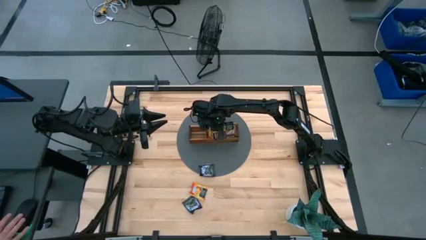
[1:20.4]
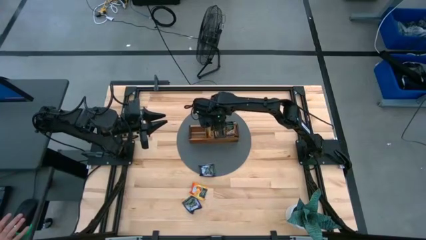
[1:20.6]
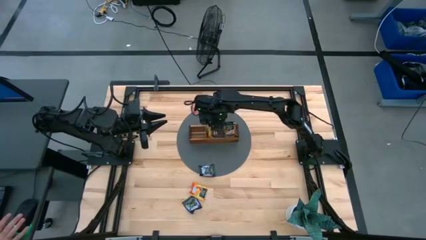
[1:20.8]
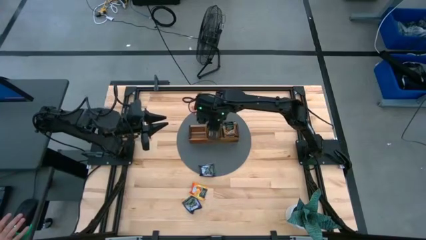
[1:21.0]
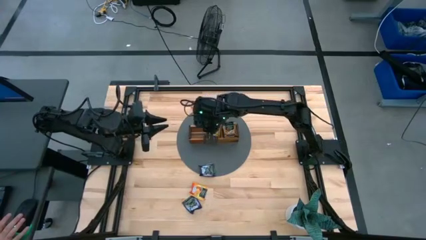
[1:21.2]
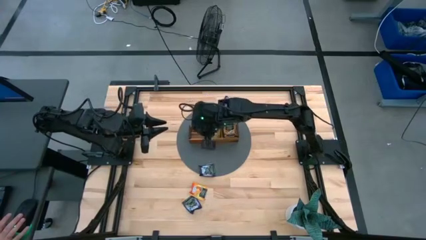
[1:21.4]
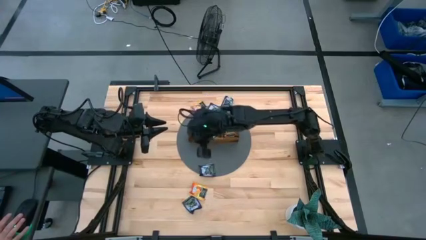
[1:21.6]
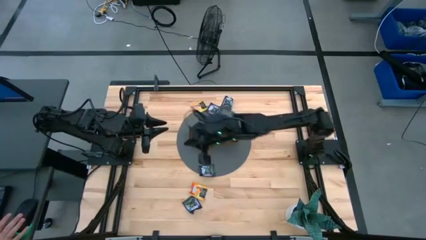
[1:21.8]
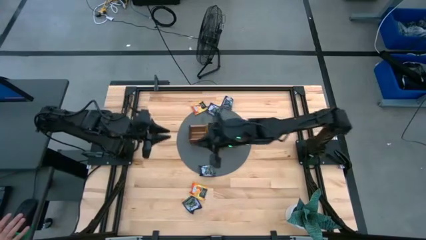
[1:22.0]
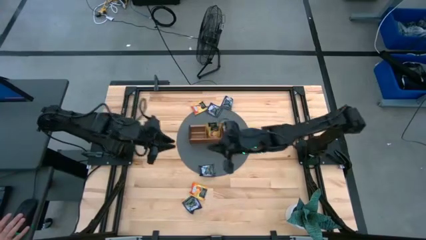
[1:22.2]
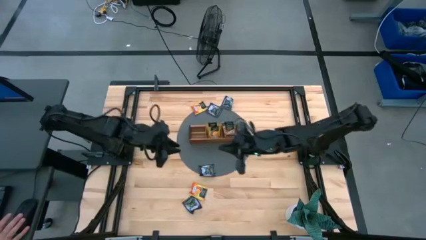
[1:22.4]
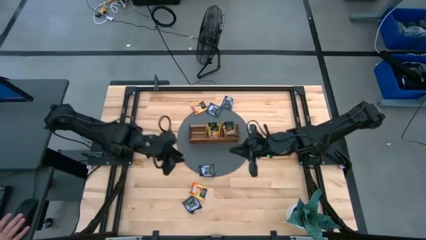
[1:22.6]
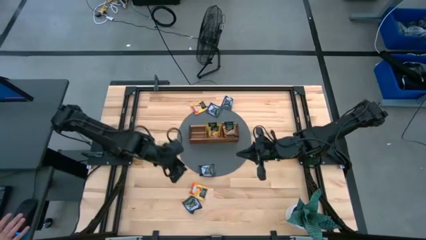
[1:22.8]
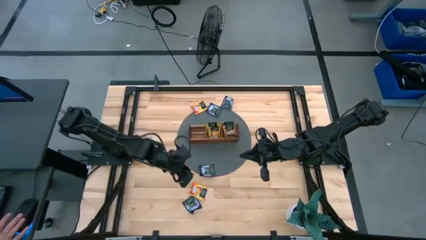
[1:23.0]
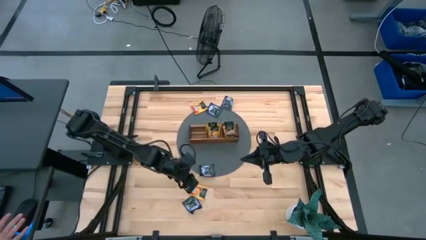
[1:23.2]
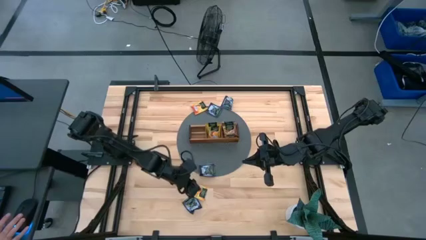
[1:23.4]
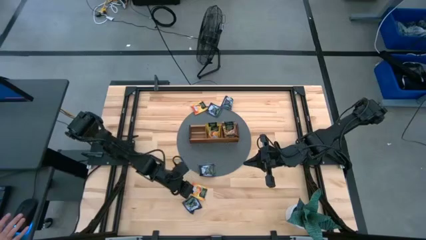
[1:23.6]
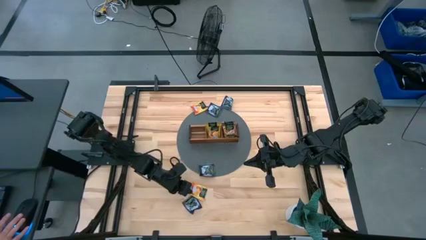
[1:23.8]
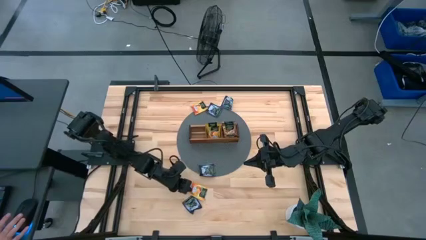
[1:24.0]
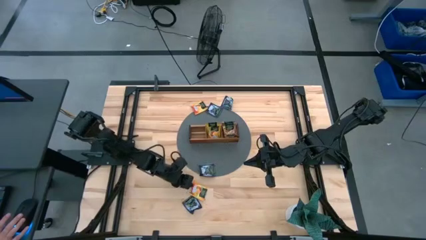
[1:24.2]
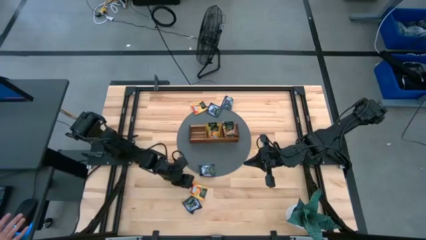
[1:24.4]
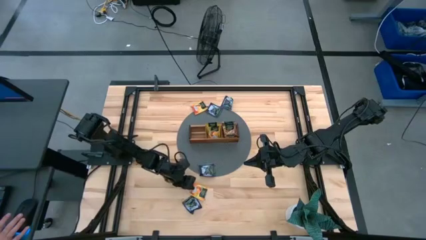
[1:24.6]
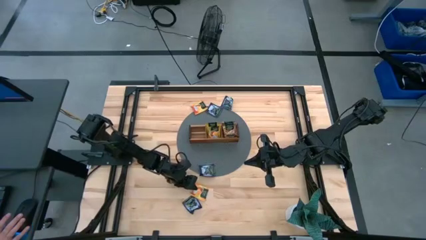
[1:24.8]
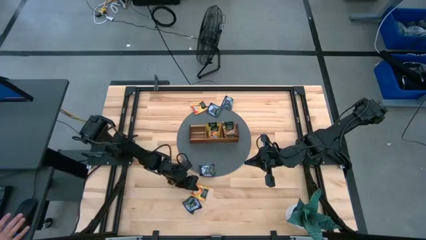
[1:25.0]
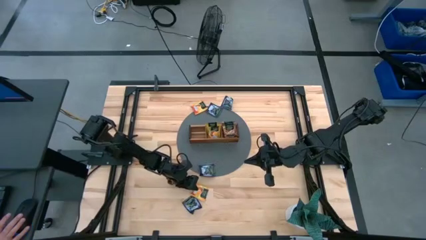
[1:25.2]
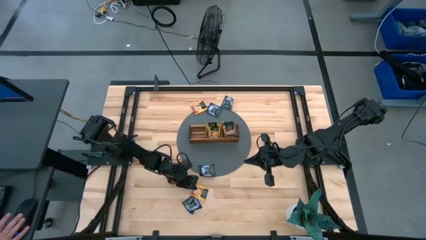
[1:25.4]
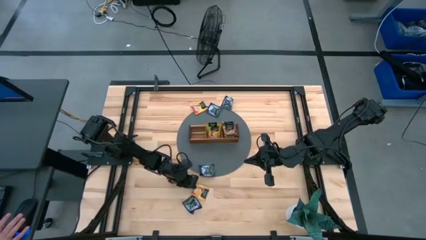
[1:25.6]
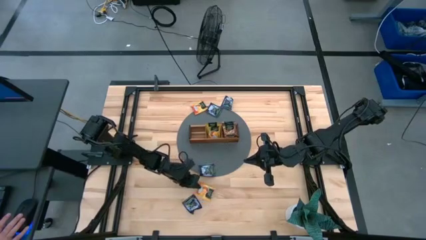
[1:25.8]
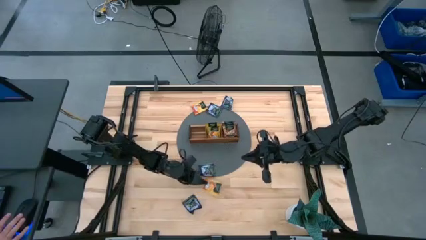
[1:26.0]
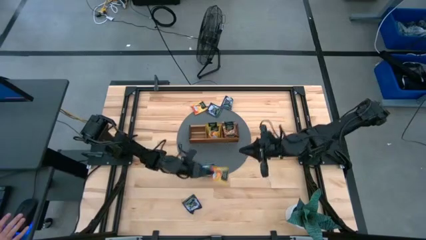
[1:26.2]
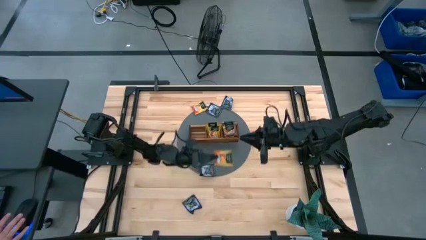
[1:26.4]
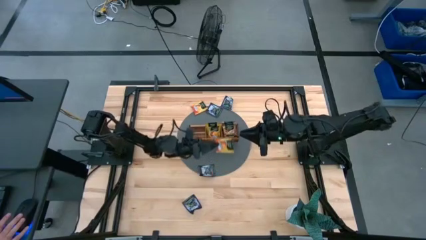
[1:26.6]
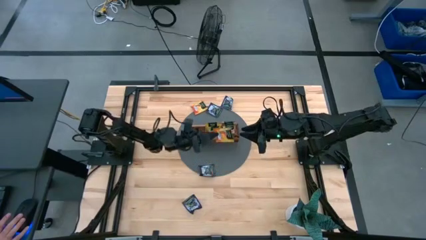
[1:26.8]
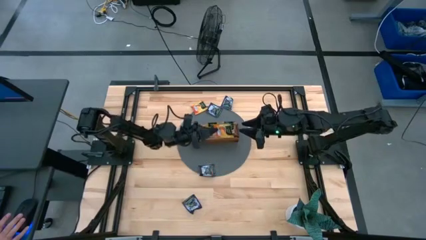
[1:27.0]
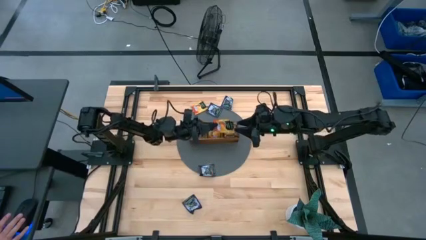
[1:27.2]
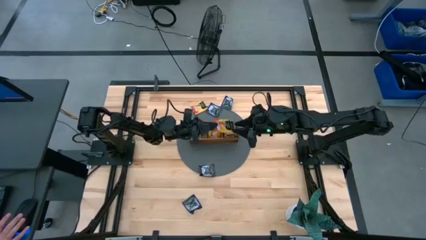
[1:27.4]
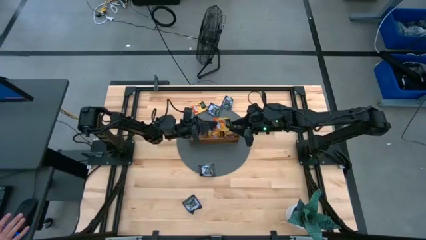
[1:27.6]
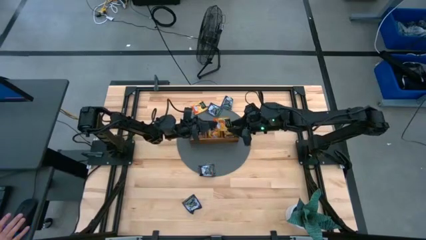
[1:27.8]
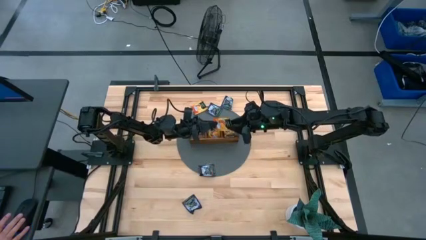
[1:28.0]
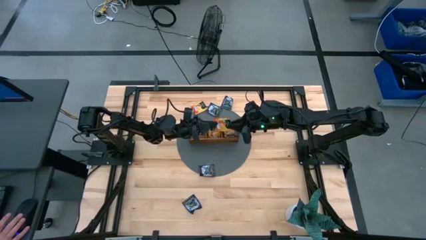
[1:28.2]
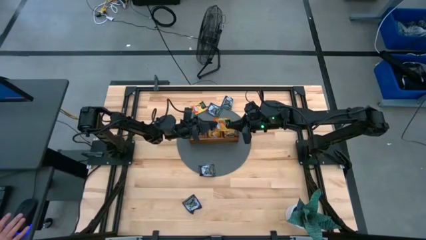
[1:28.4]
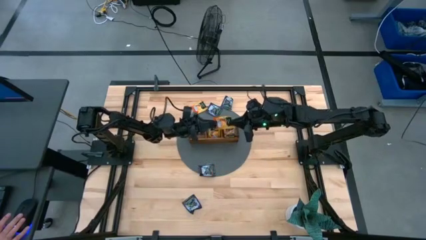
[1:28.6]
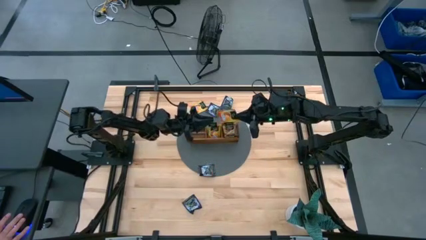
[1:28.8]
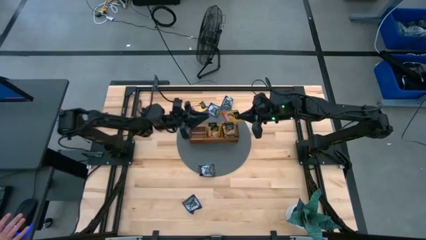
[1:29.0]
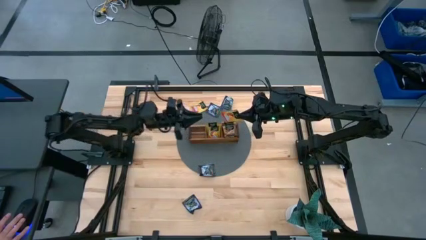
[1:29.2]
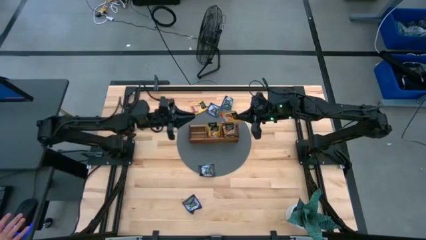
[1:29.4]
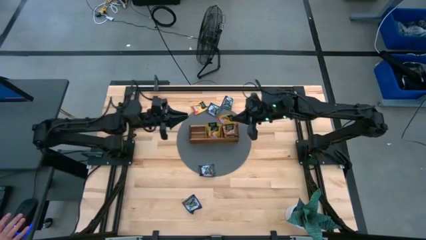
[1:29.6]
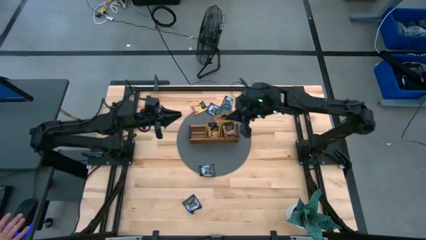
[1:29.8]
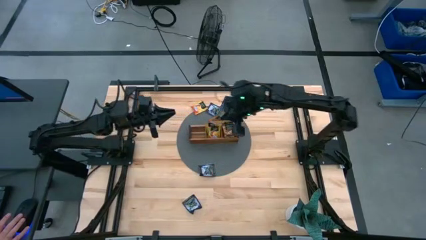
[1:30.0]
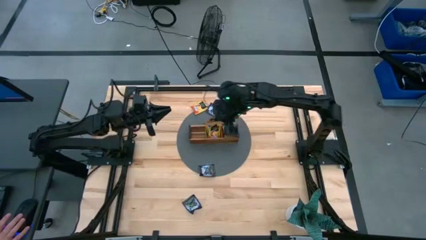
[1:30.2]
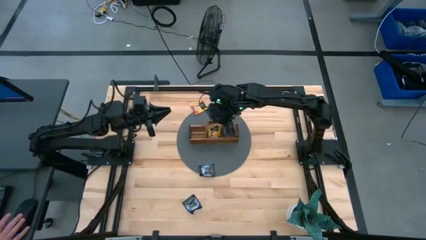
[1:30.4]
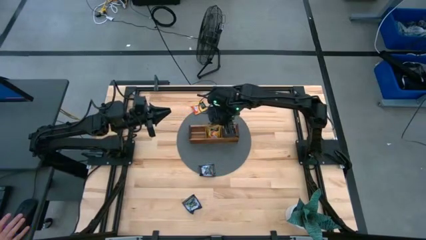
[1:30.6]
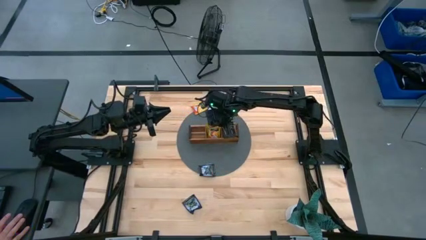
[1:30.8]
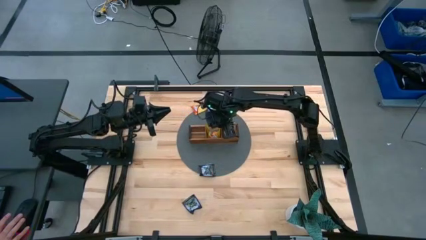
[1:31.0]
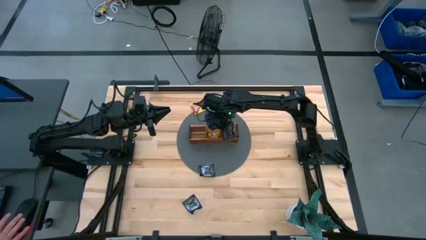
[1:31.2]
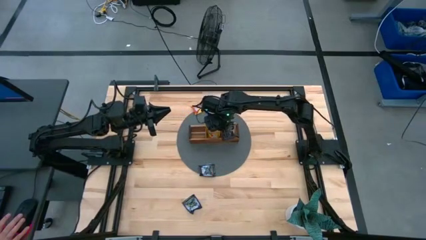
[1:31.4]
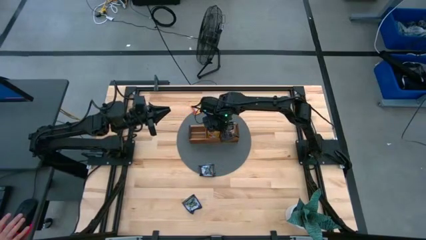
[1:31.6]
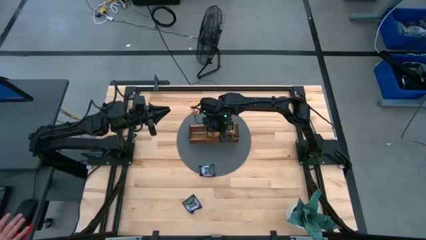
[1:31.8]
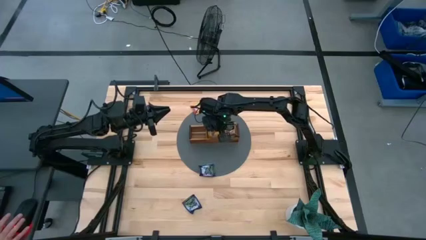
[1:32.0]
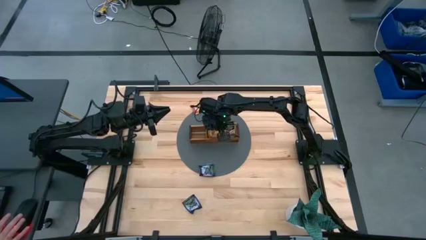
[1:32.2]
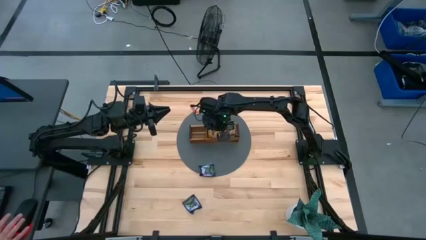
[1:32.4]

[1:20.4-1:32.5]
Task: Pick & Place Tea
Put the yellow tea bag into the middle section of the wooden organizer
